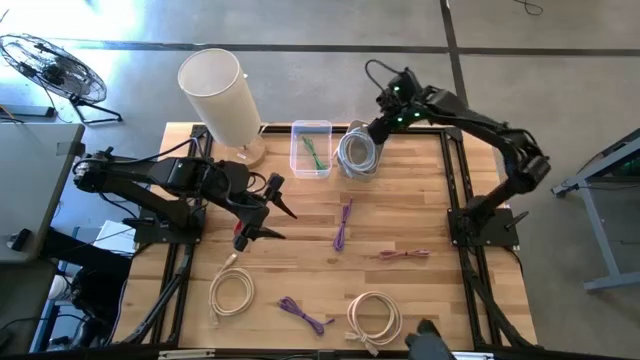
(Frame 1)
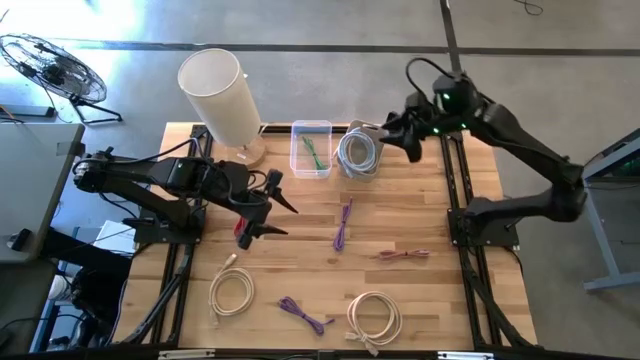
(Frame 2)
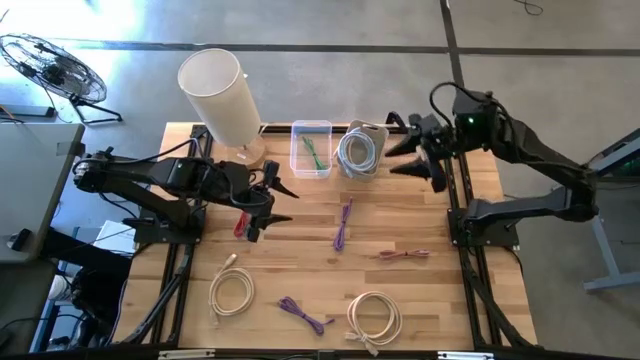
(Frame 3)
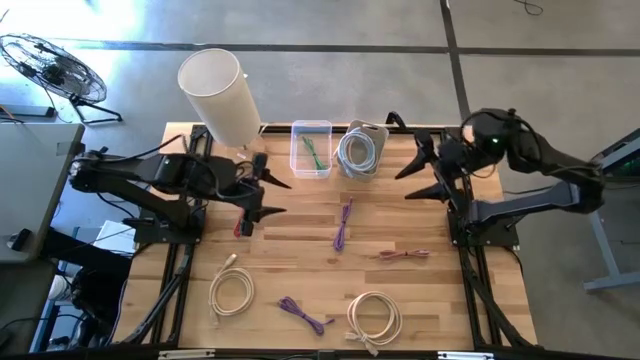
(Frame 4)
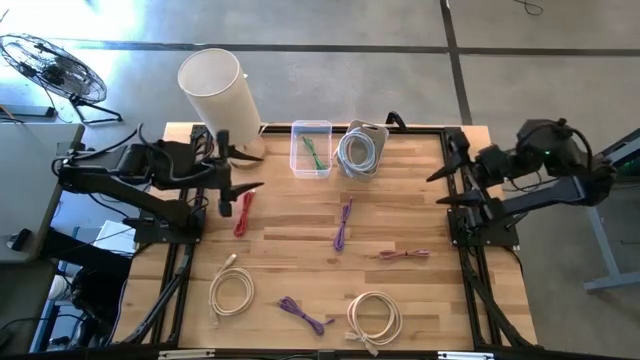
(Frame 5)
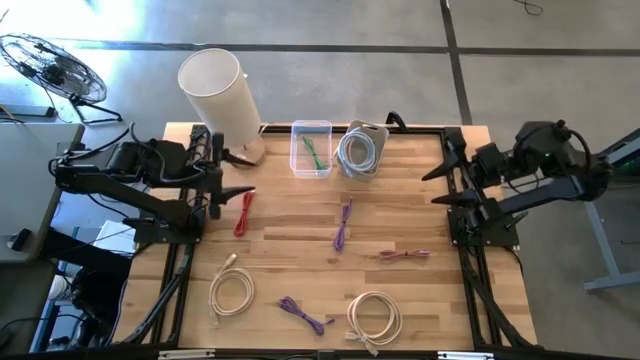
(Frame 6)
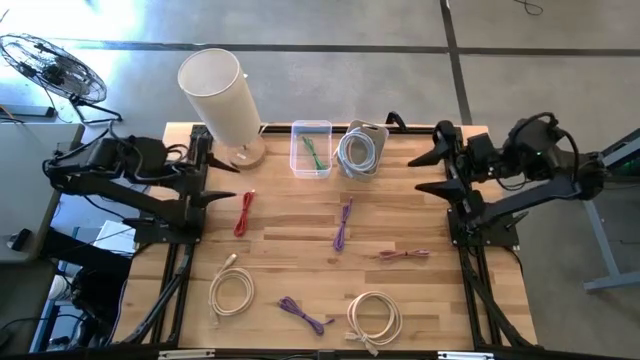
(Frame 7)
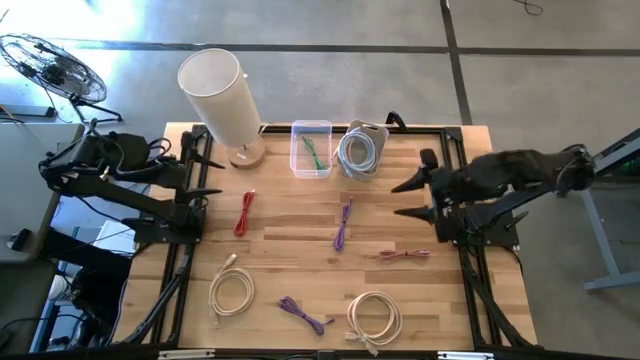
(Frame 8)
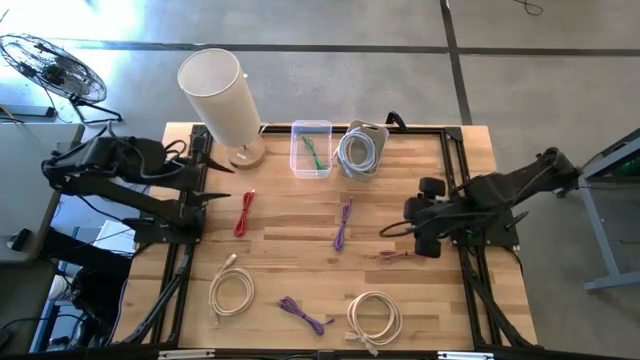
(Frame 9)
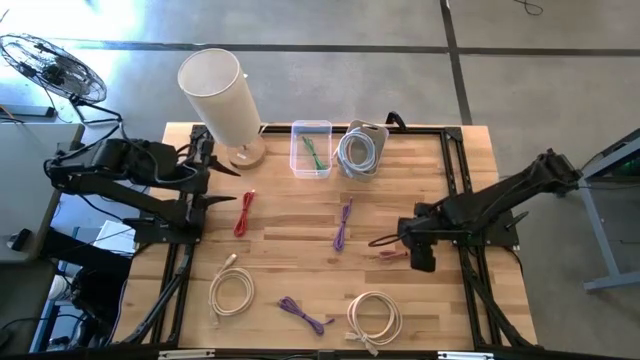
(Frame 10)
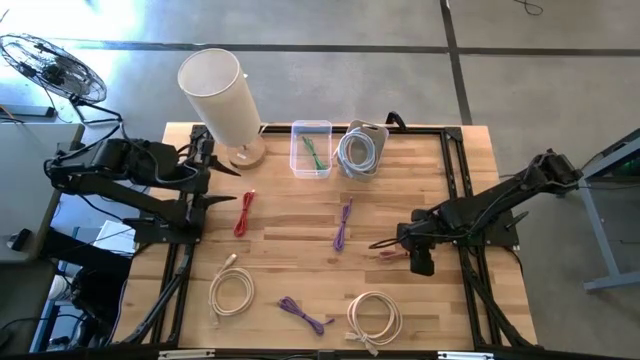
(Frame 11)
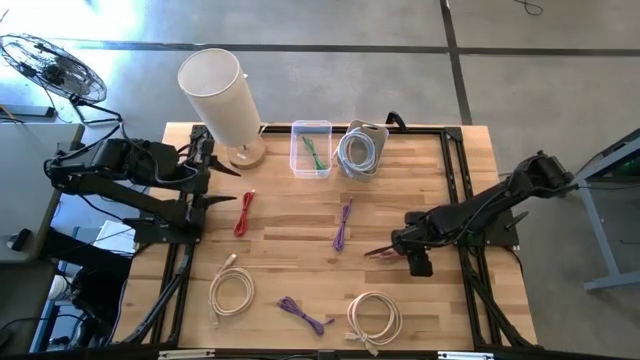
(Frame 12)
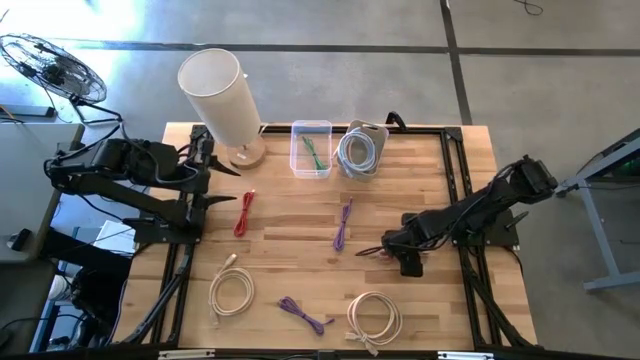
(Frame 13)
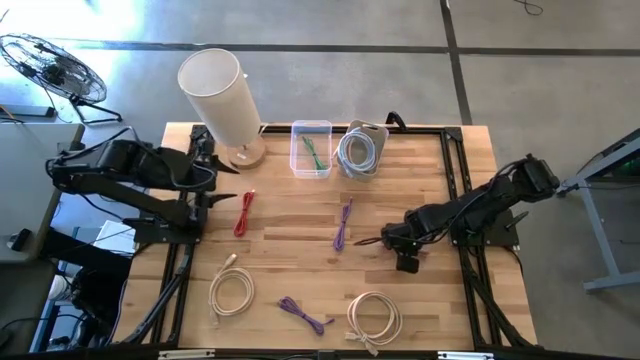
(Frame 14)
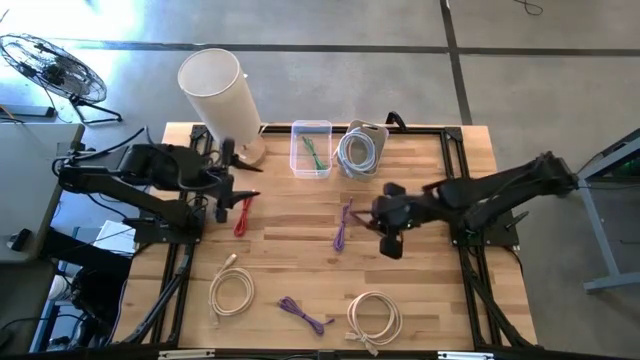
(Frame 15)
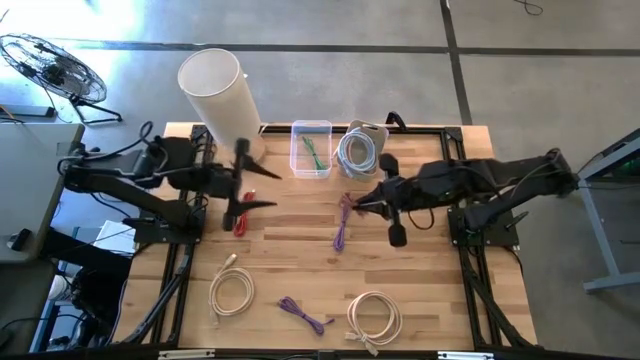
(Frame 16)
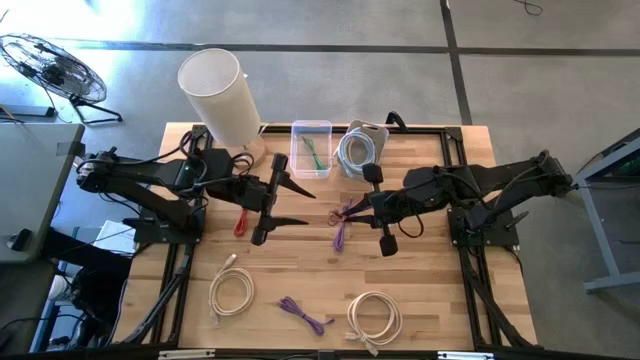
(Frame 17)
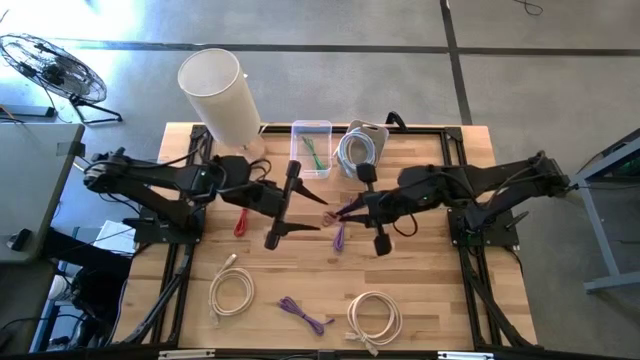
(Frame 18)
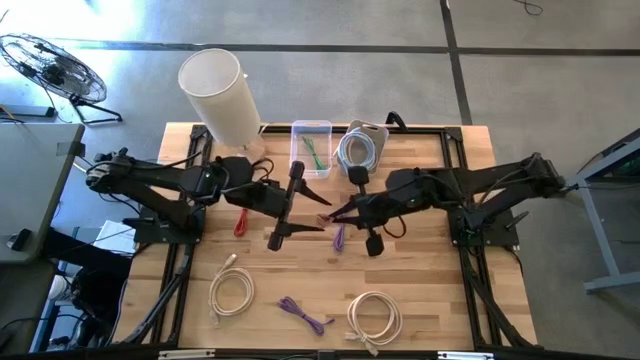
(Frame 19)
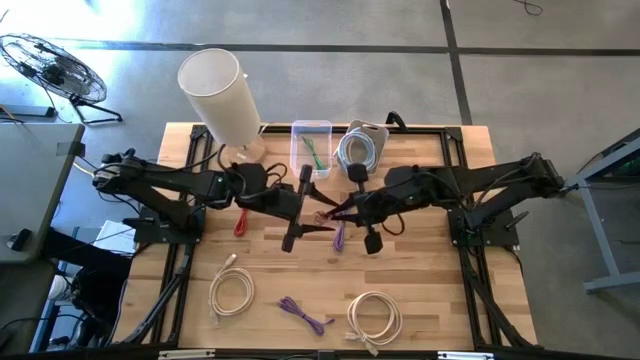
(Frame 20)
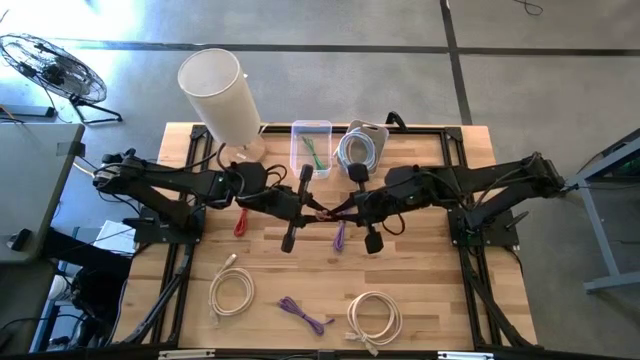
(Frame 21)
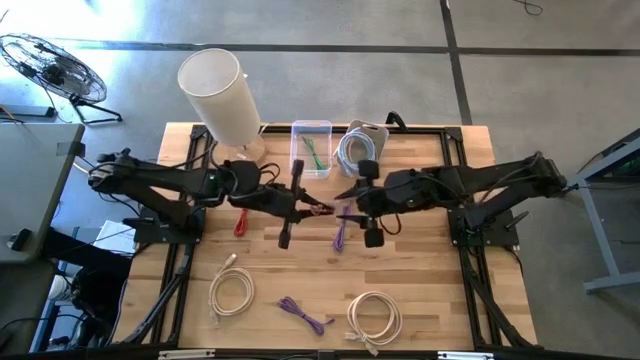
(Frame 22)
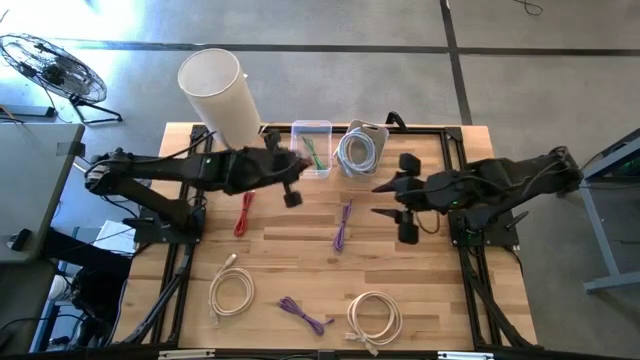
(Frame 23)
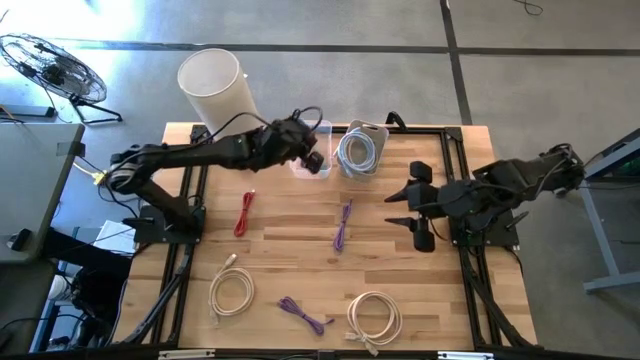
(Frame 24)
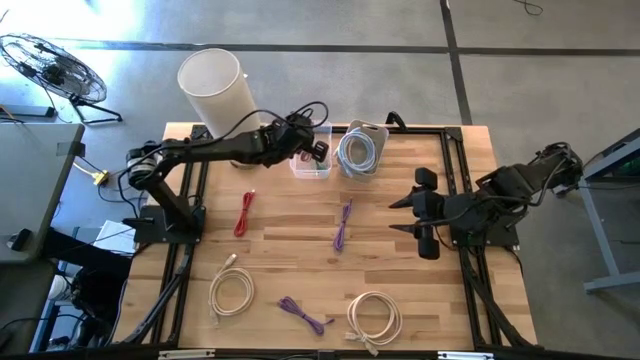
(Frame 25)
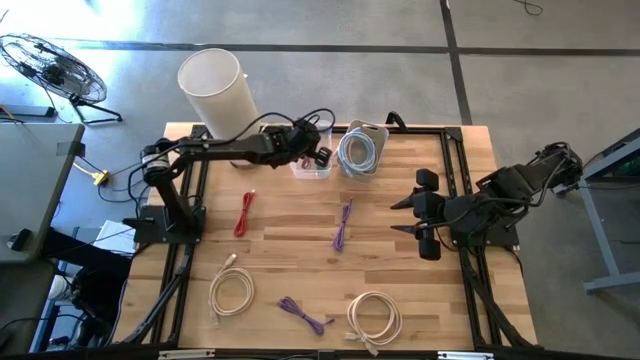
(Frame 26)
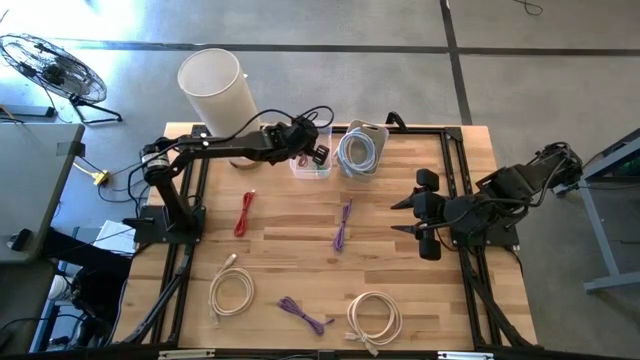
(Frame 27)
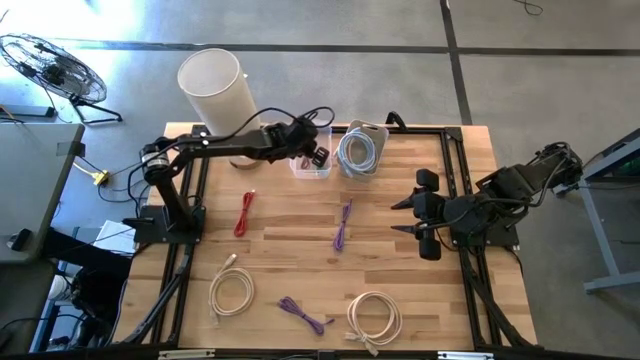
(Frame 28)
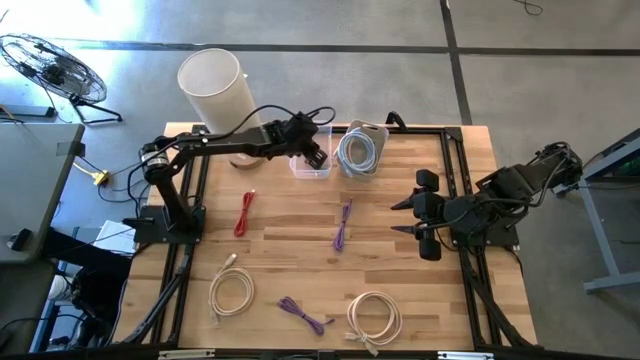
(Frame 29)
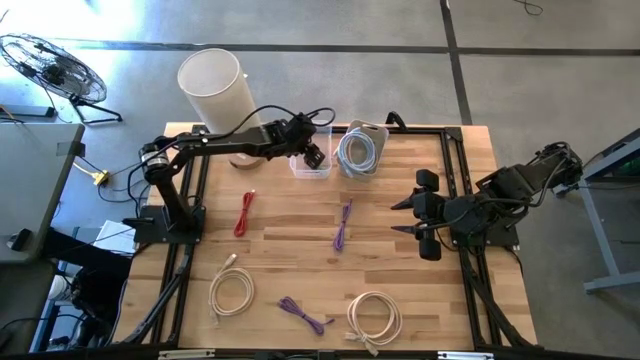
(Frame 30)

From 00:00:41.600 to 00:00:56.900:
Task: Pick & Place USB Port
Put the pink charger cable into the transparent bin

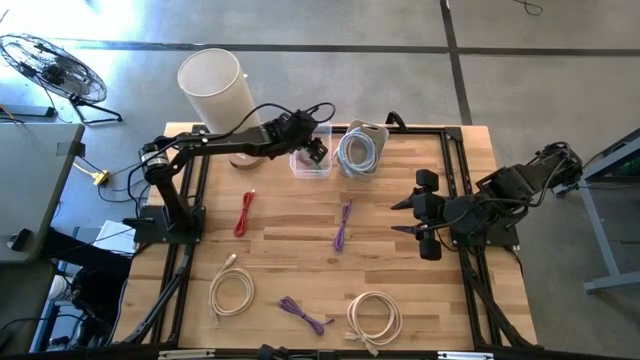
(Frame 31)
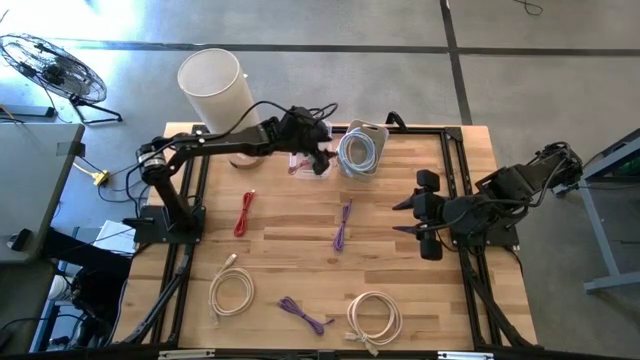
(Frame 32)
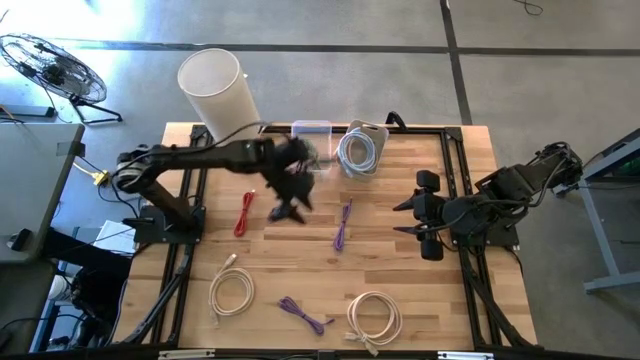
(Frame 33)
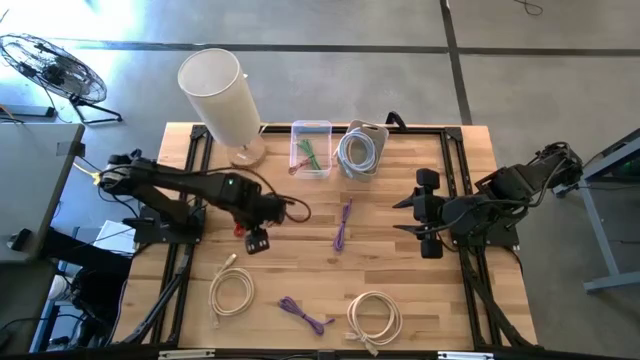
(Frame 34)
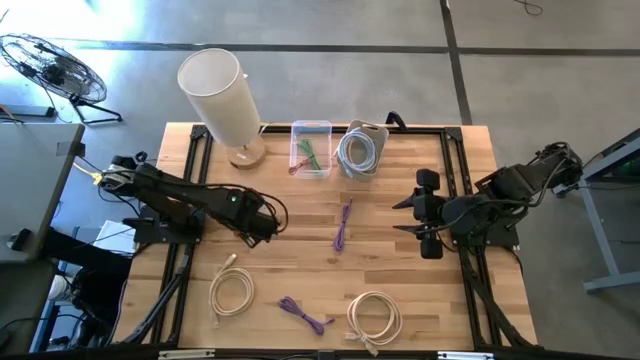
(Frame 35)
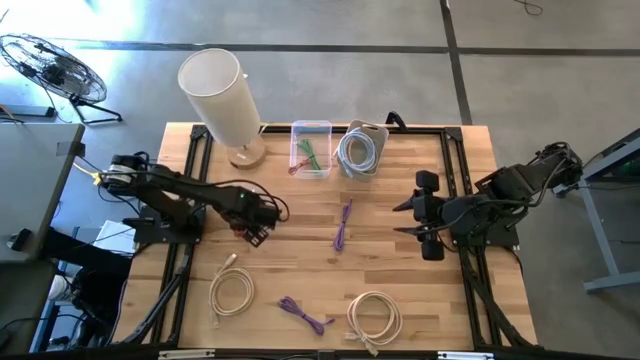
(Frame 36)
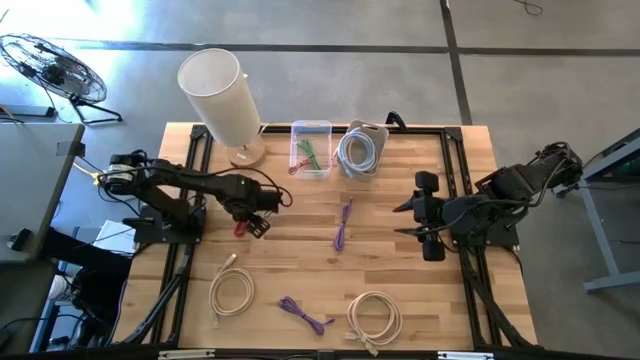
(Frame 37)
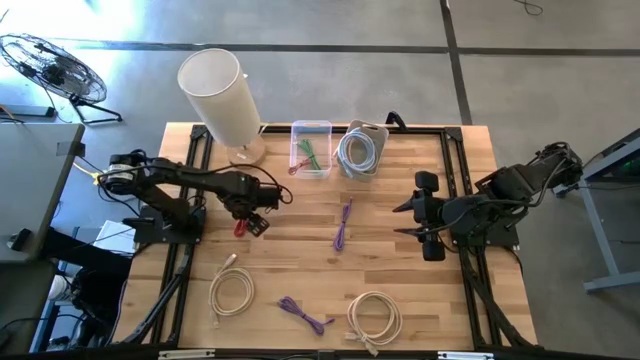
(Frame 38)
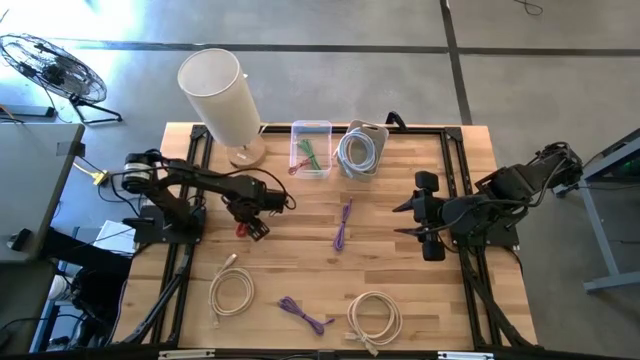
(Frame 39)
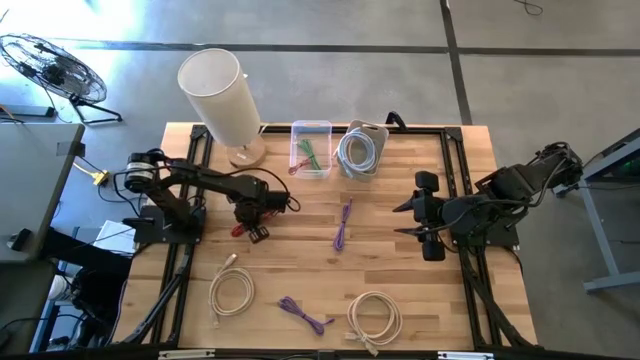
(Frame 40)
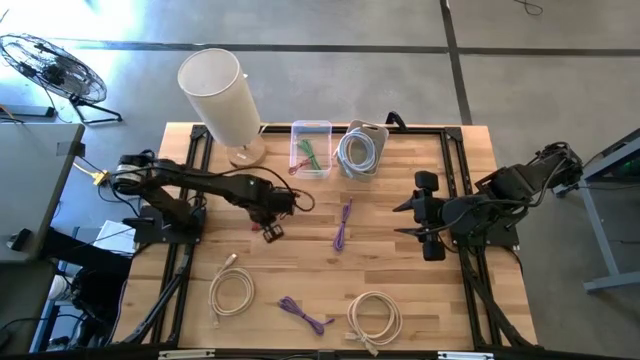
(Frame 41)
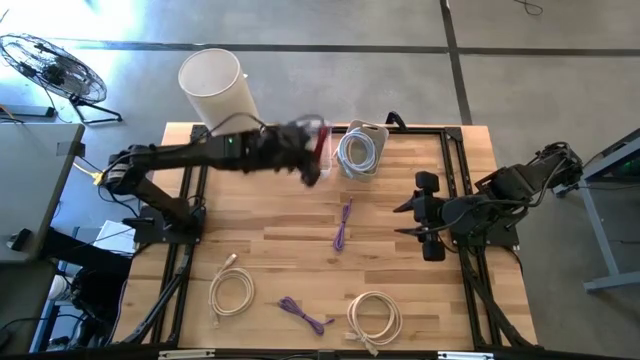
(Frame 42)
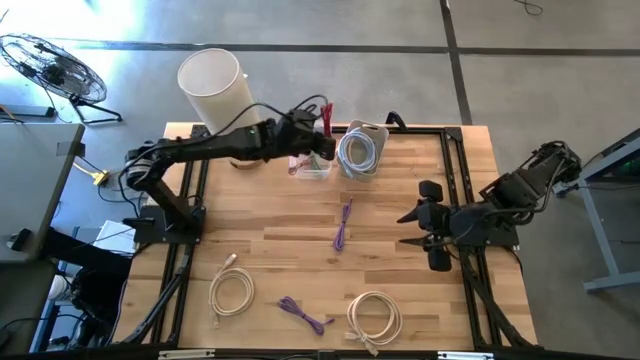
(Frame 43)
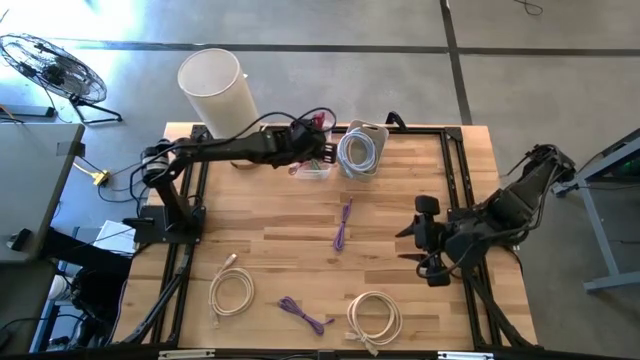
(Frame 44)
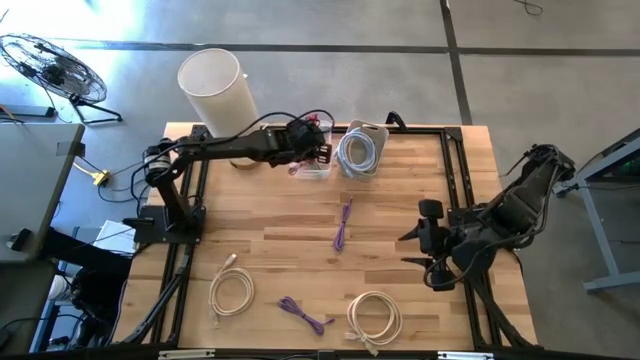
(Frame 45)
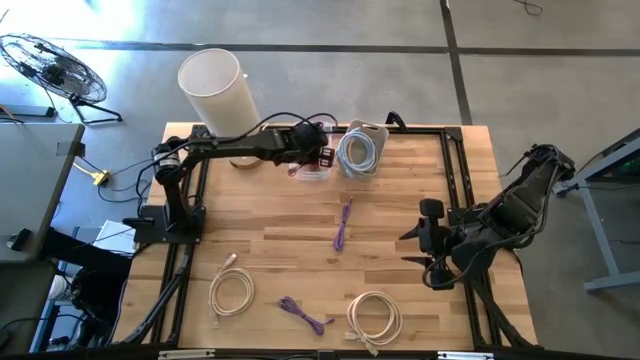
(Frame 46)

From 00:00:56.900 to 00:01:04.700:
Put the red charger cable into the transparent bin
